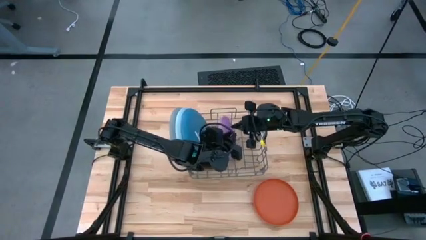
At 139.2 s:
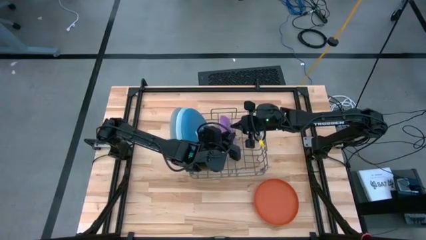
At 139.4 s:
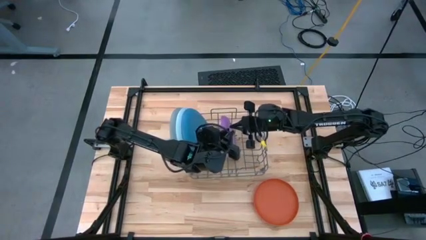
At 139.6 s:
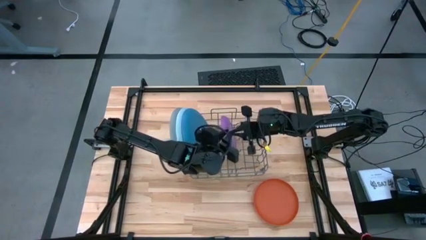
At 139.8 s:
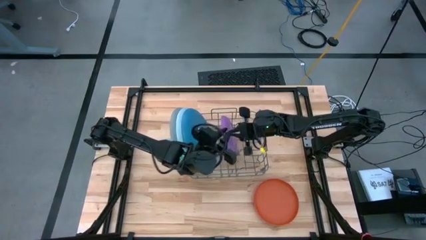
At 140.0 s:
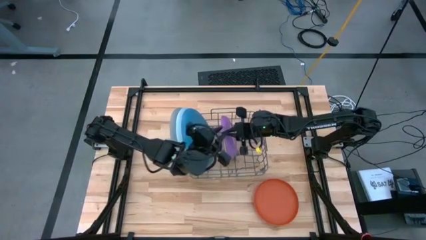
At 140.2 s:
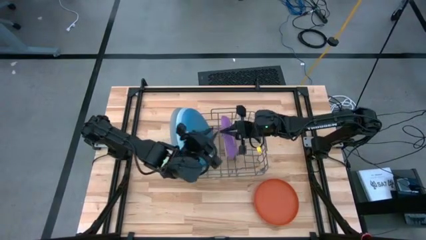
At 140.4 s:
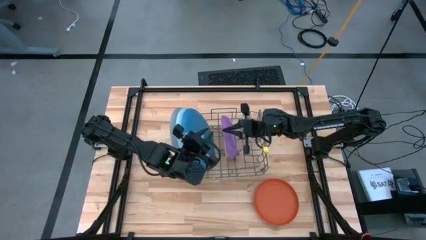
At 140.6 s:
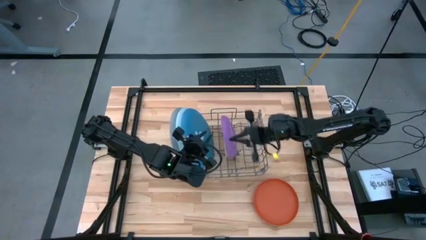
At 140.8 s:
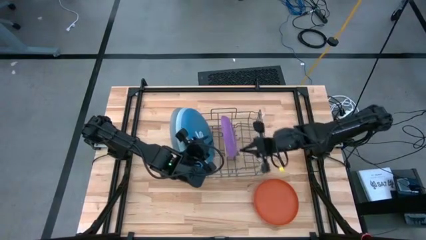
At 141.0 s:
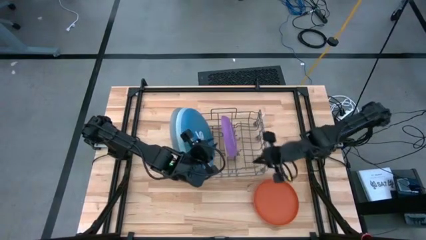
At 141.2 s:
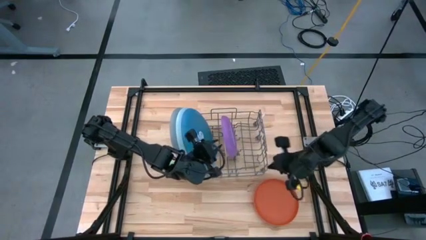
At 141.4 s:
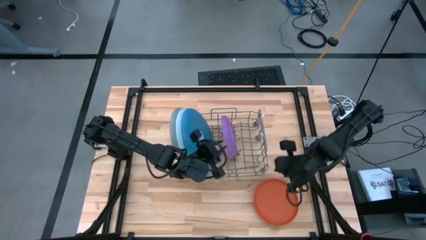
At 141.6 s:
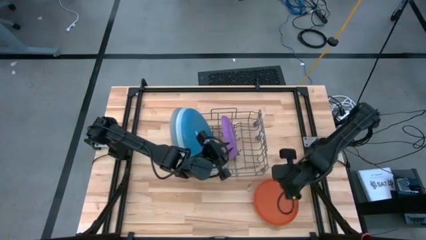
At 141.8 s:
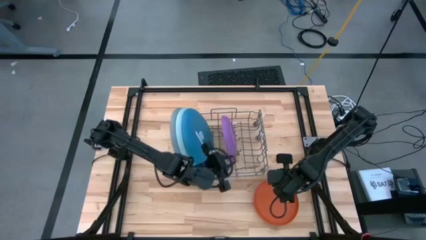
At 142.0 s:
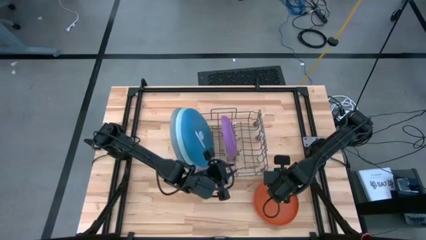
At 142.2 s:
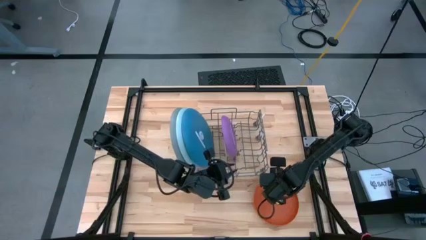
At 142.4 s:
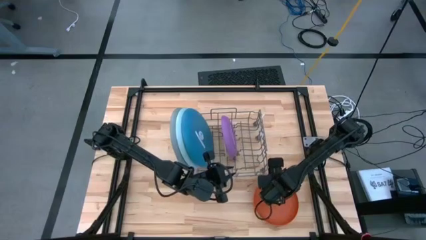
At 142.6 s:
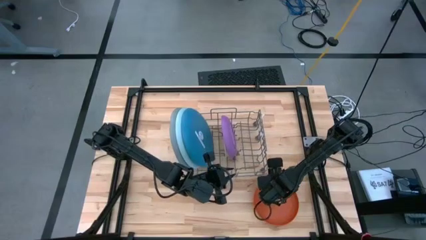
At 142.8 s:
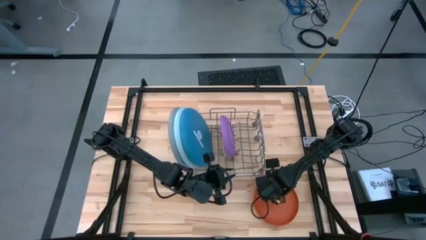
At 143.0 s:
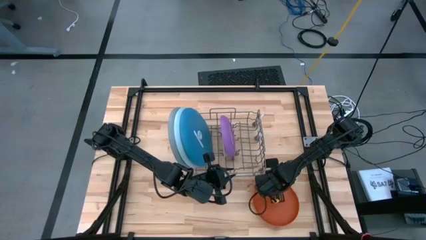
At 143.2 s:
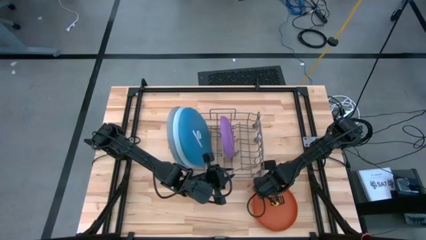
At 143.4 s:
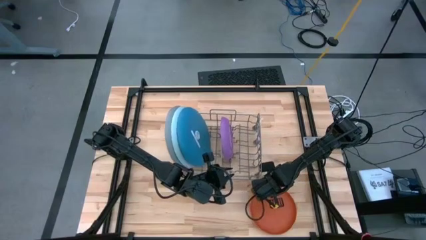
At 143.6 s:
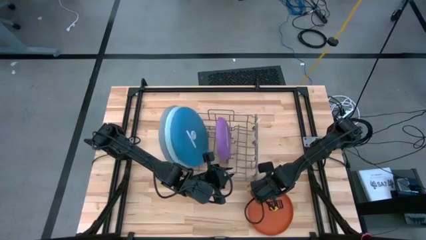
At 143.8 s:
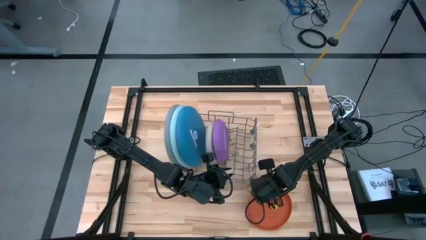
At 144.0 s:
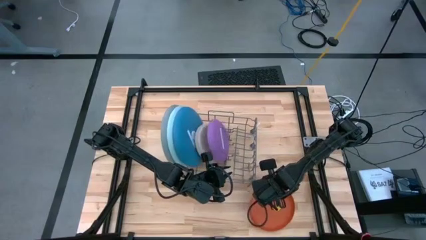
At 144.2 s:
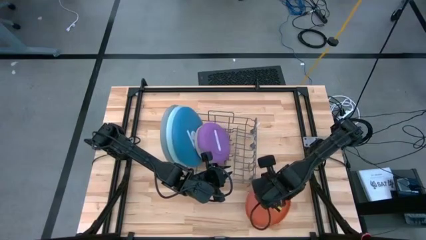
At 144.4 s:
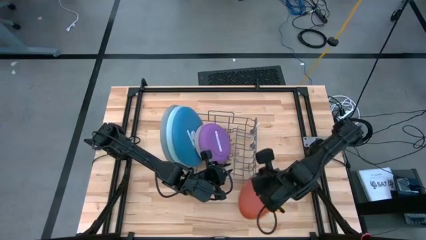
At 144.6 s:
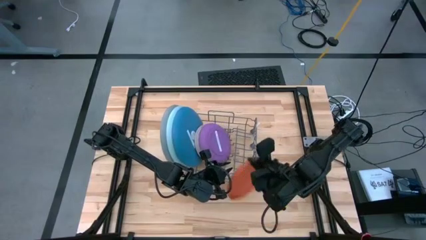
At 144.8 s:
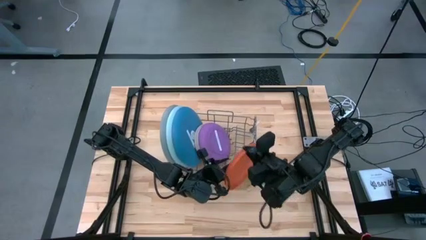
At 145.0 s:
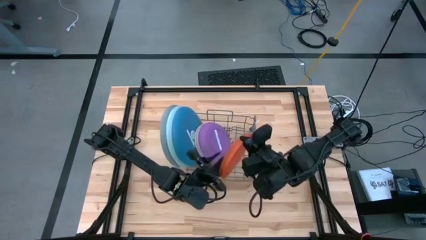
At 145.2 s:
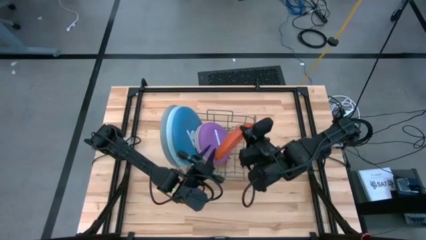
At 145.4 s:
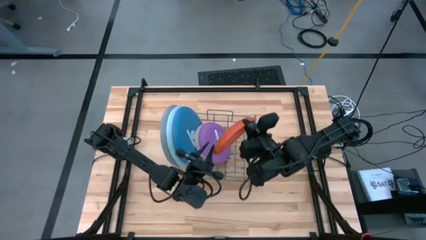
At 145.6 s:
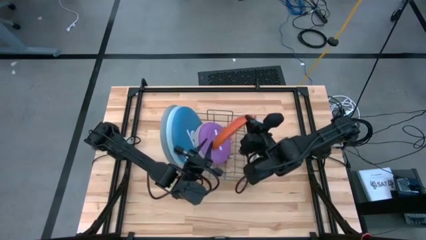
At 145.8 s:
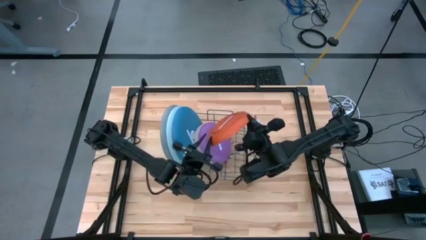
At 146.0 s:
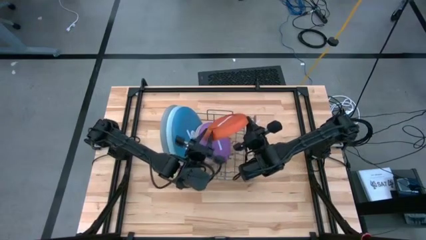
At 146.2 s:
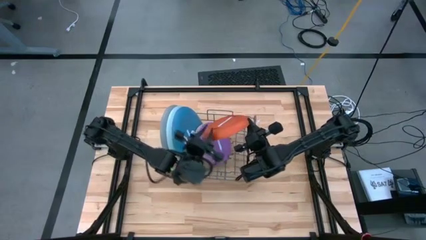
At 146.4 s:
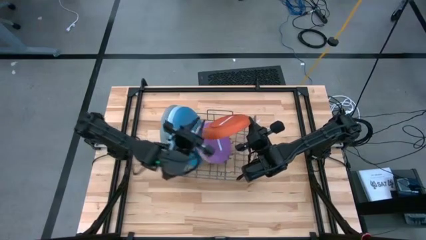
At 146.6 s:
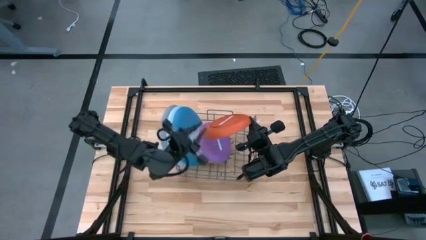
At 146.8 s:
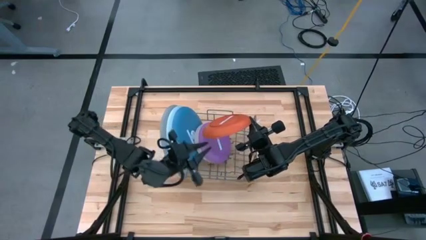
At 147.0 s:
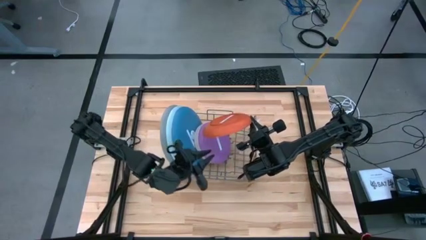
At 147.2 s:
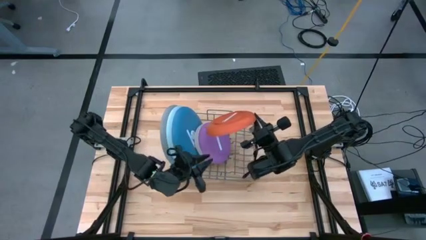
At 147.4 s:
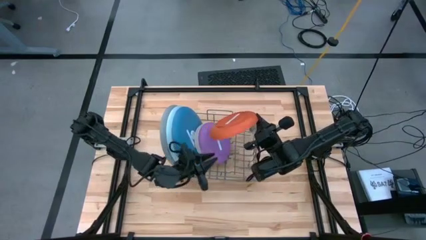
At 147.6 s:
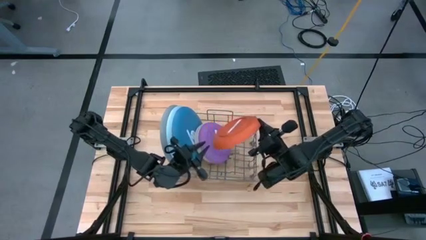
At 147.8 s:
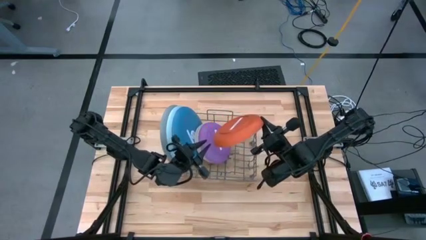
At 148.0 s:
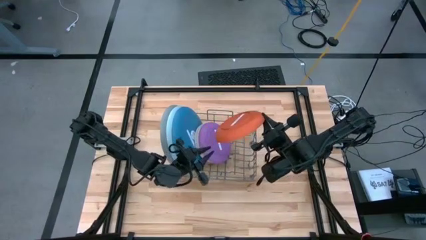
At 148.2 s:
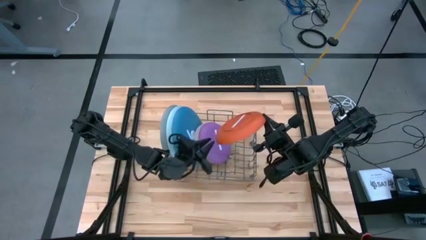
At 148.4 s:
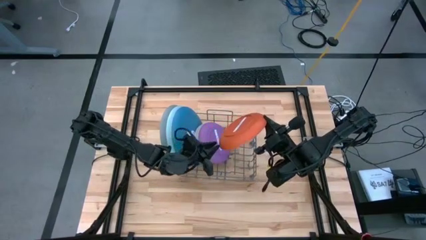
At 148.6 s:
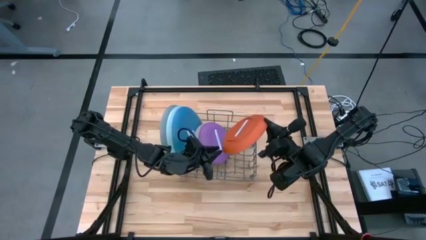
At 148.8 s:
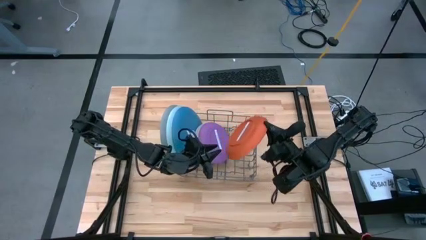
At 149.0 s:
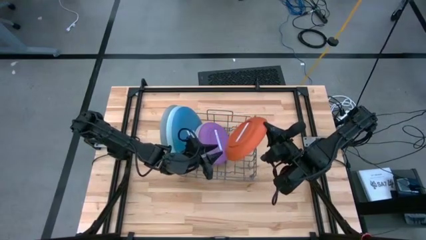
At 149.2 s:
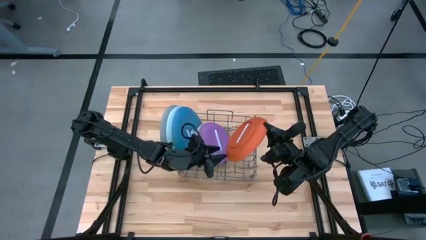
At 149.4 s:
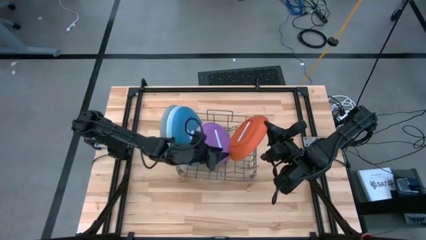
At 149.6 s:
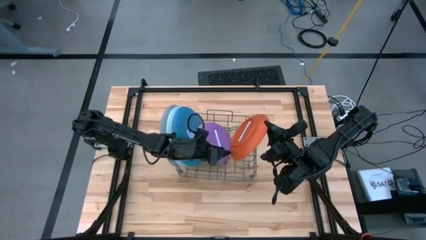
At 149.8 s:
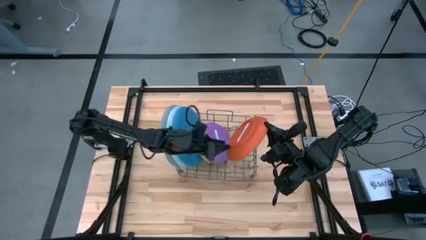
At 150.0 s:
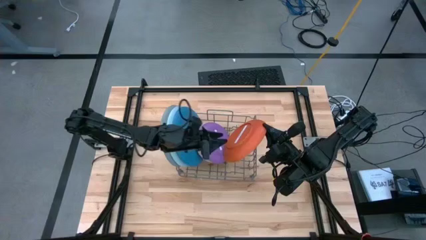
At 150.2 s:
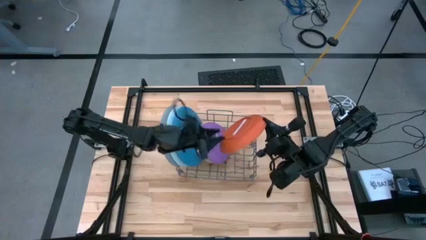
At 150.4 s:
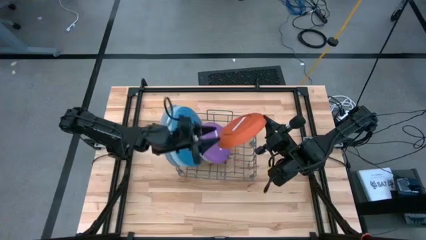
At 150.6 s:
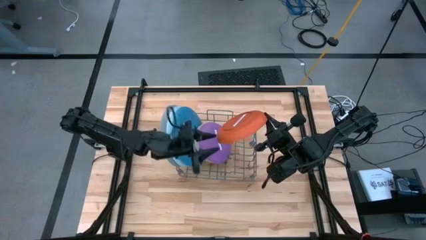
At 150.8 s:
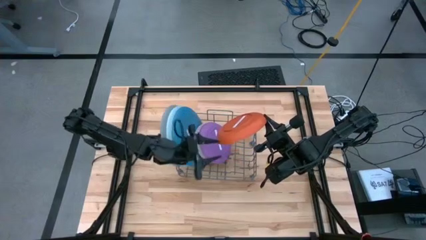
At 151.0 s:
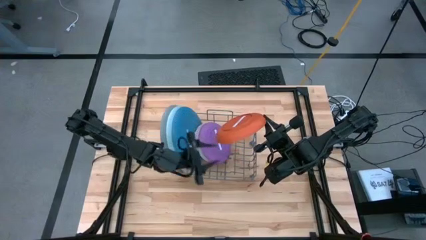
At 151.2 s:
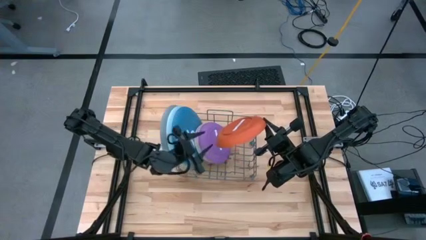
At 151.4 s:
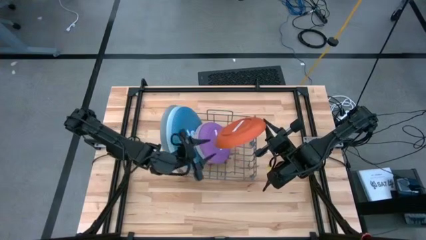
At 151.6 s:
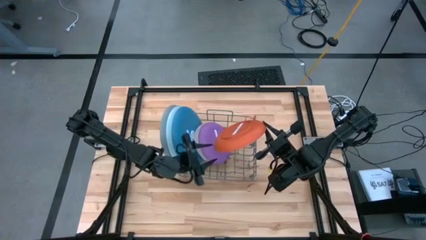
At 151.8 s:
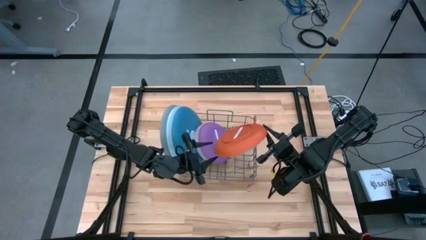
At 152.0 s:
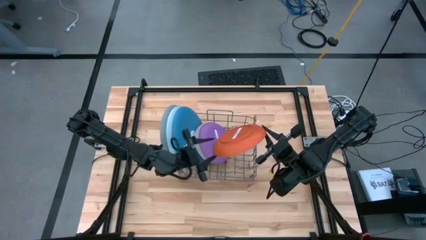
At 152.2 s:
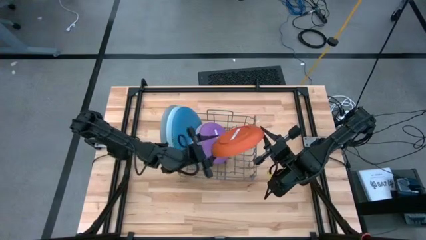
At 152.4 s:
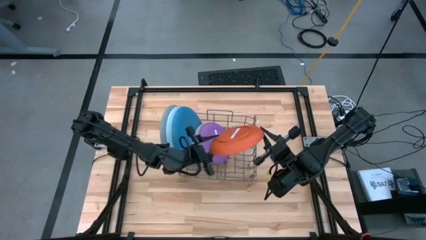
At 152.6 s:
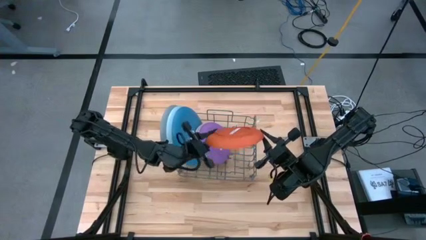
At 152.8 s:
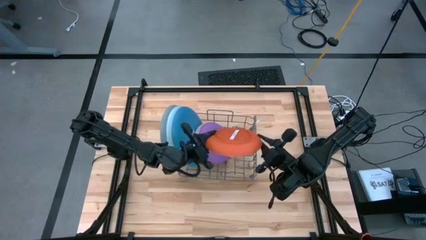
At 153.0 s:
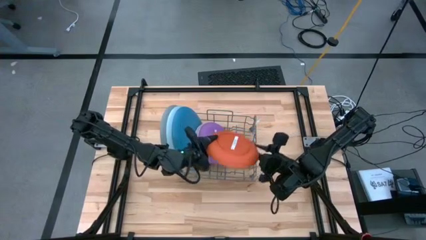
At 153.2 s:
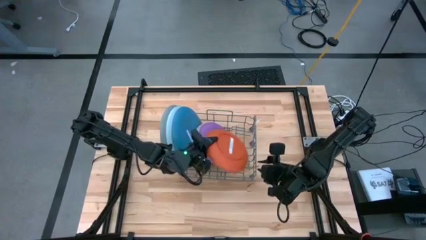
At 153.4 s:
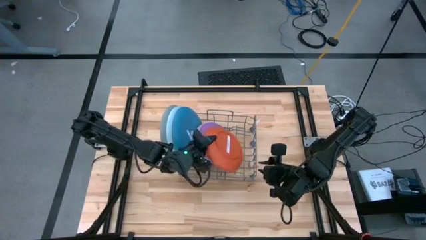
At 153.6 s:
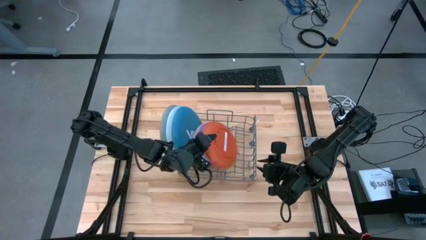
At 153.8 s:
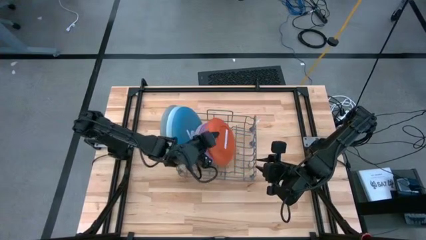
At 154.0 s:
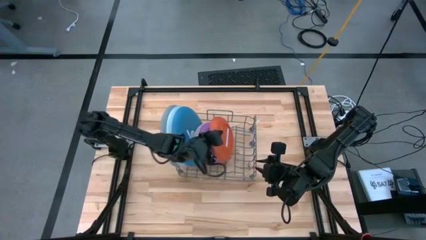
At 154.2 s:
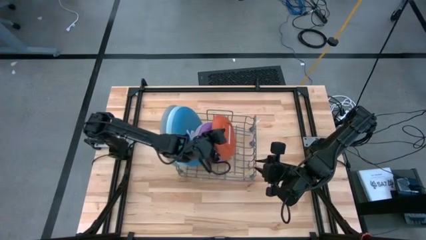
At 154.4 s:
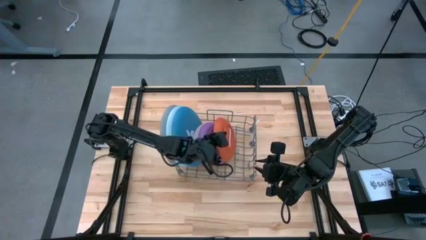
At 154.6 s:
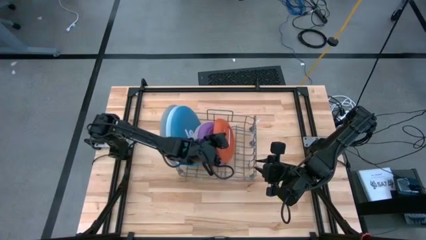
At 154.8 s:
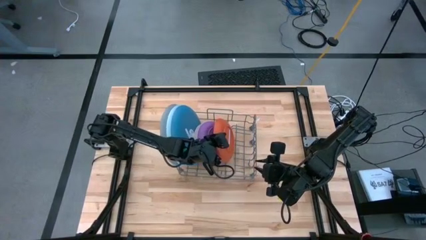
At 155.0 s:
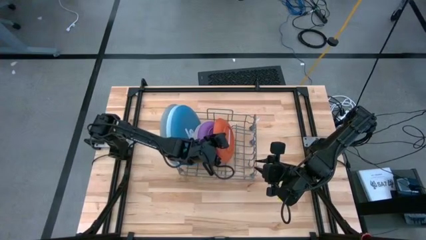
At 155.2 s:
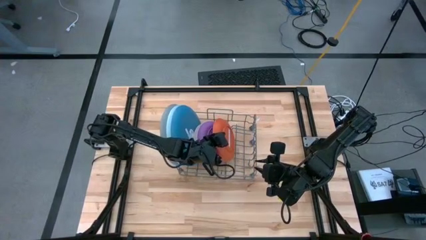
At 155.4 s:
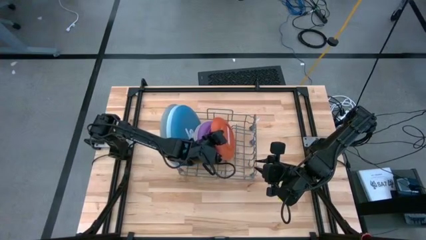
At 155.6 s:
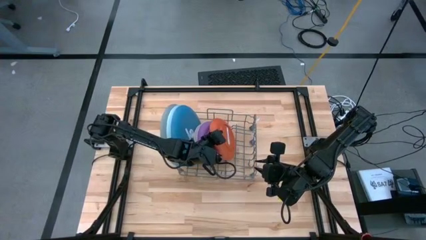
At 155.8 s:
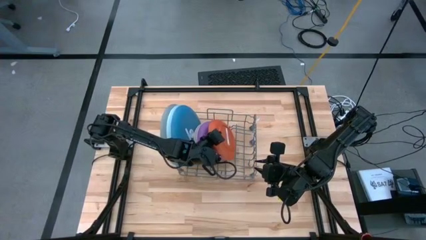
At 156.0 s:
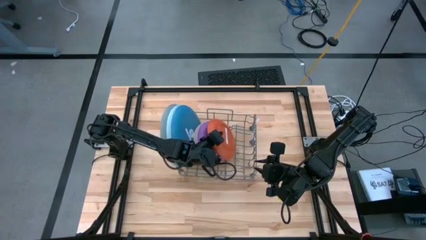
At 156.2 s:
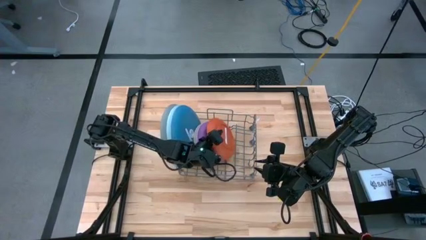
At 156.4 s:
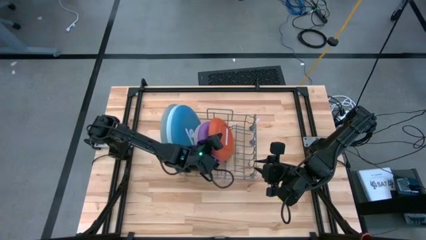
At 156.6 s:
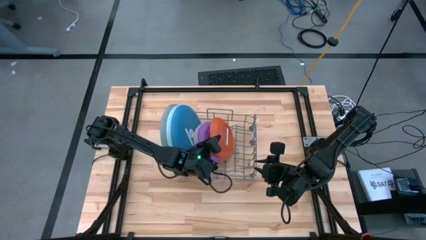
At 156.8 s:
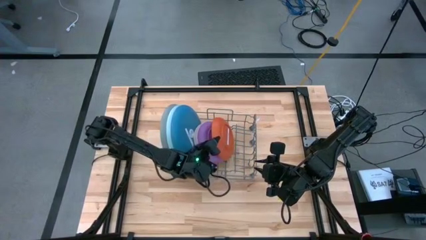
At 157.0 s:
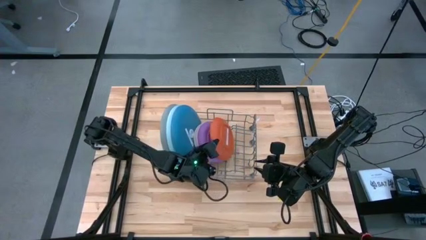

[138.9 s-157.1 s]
Task: Sort dishes
Put the orange plate into the dish rack
